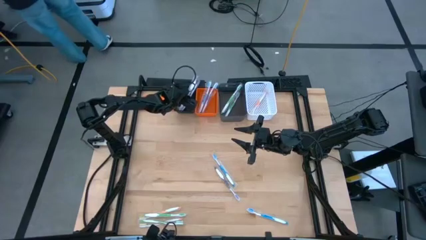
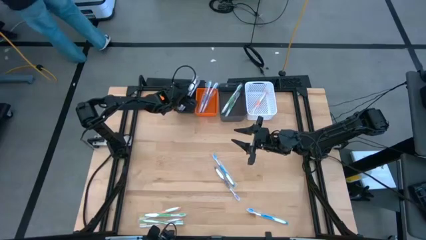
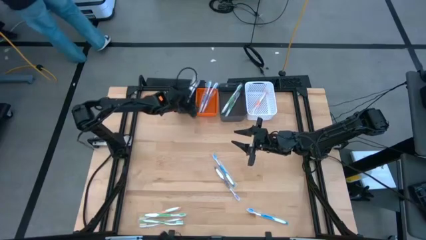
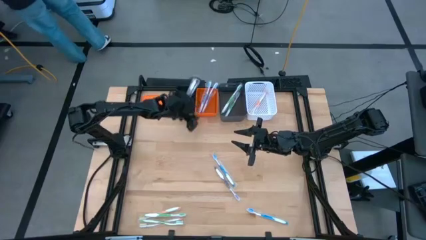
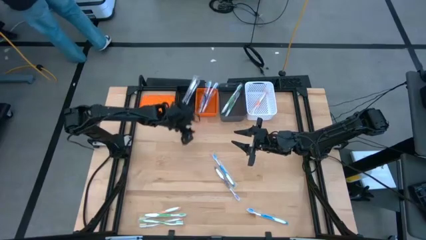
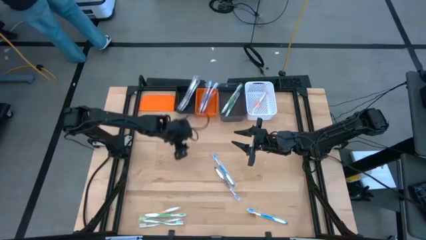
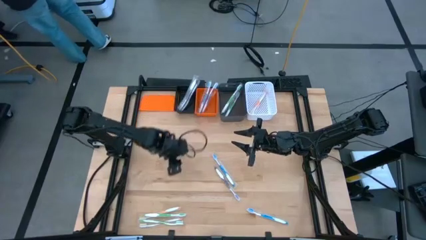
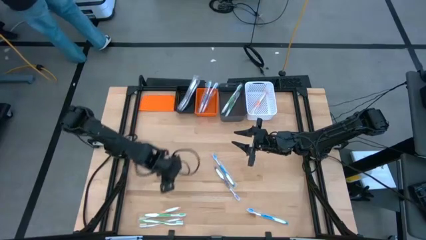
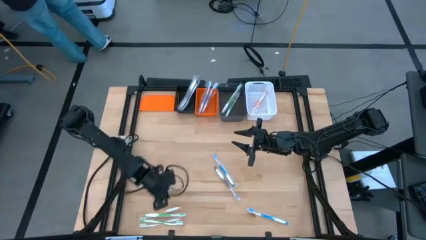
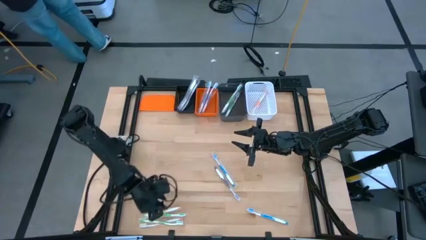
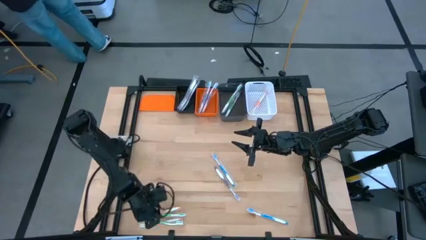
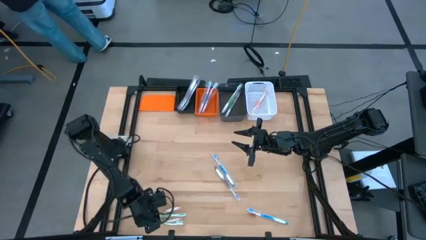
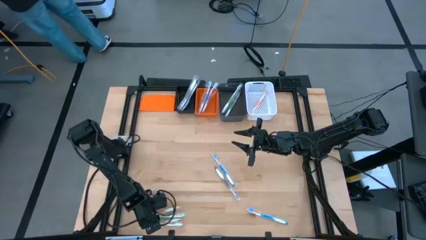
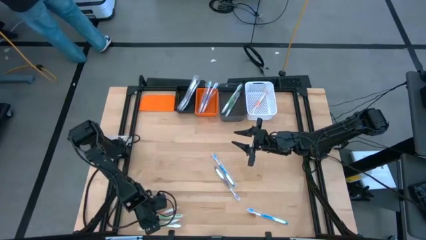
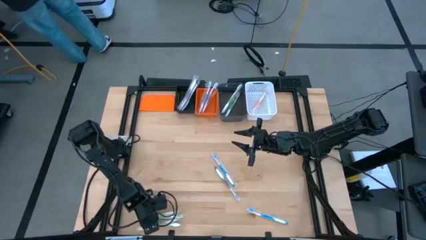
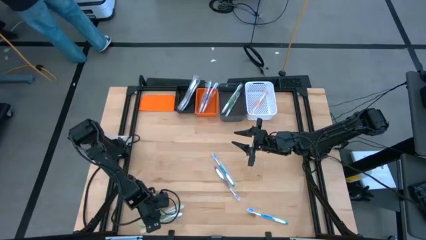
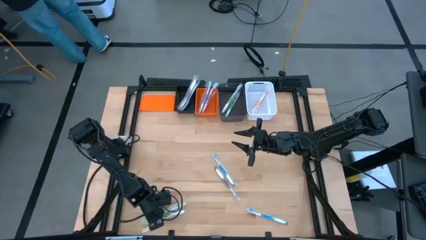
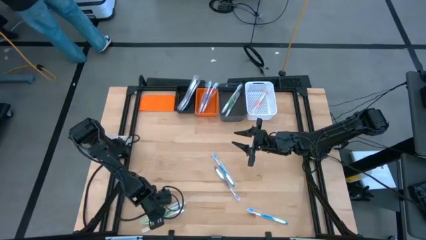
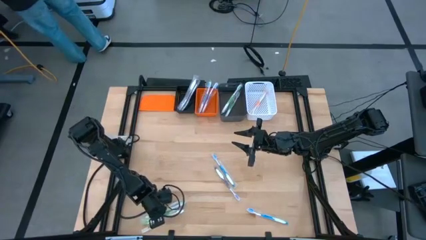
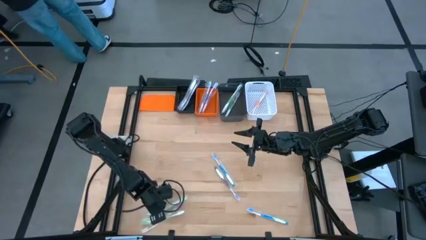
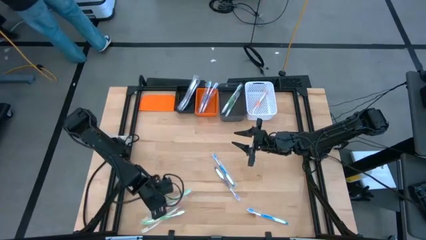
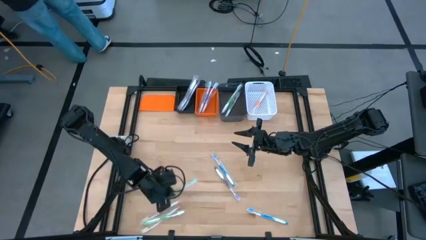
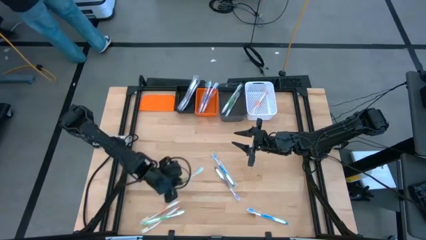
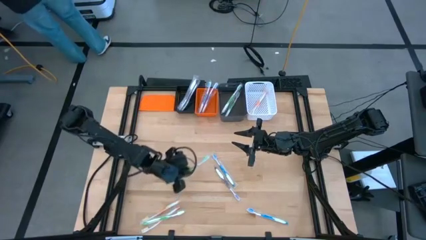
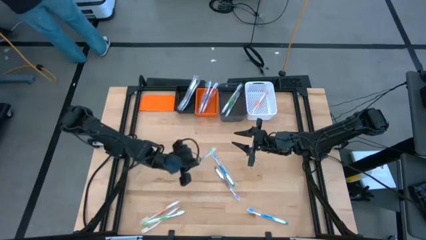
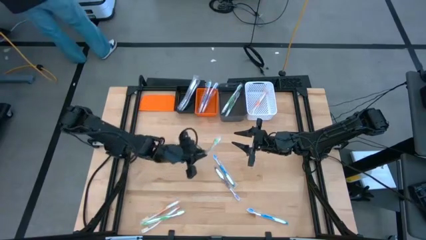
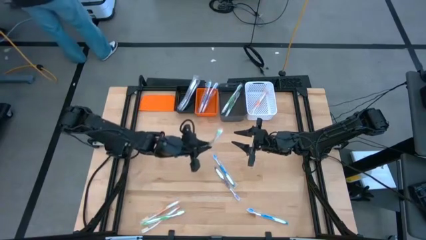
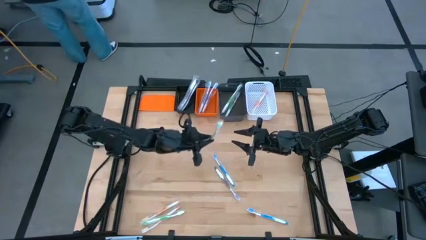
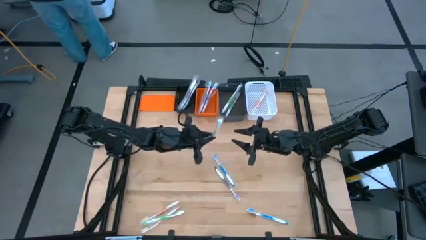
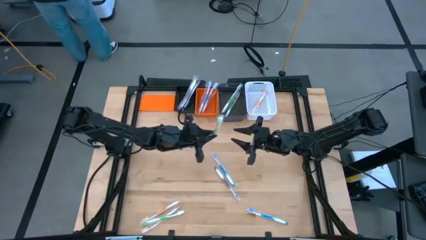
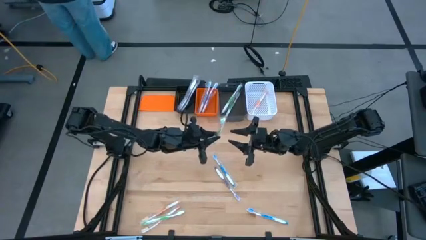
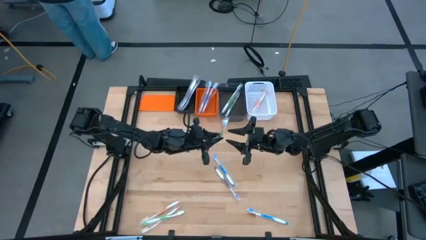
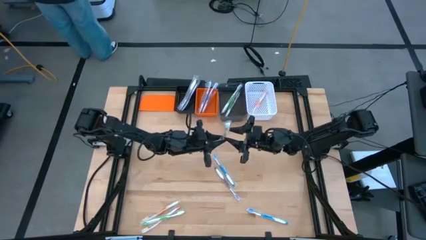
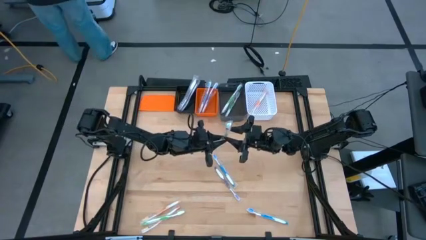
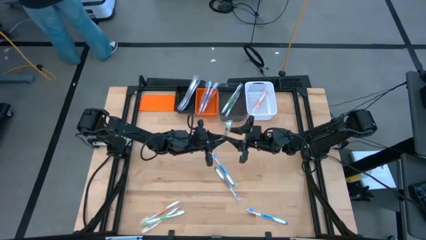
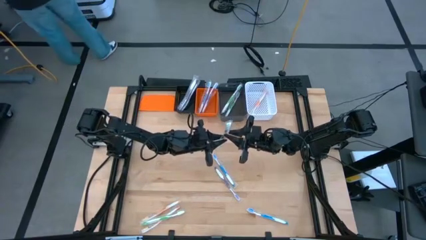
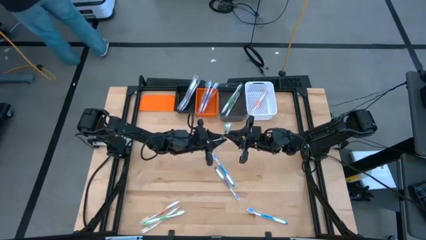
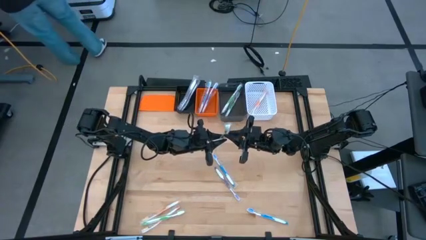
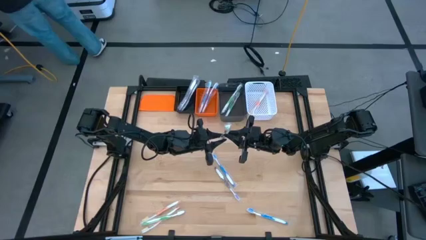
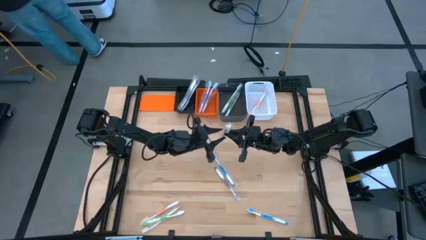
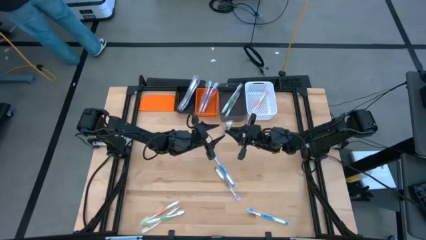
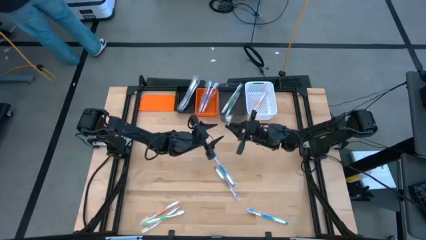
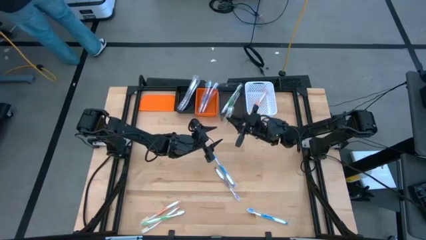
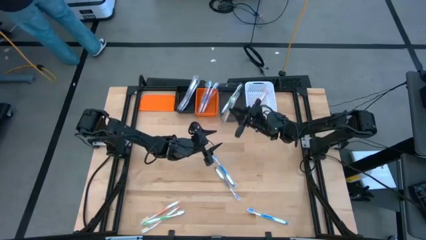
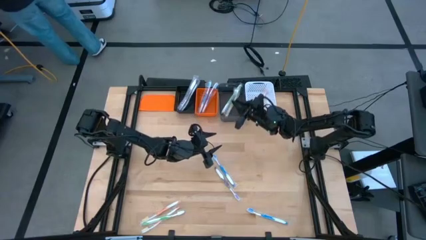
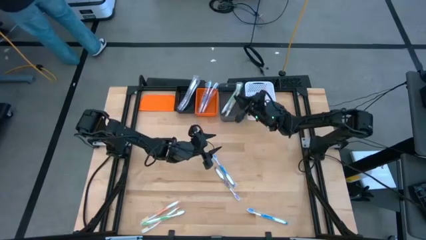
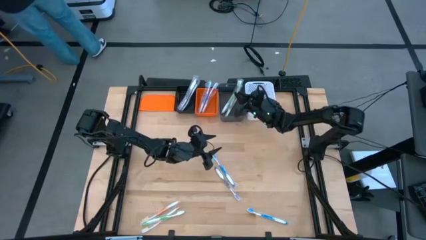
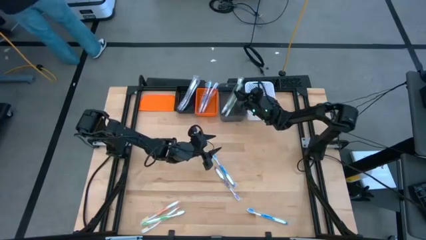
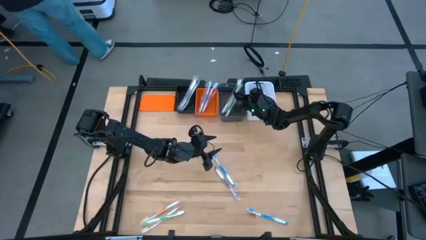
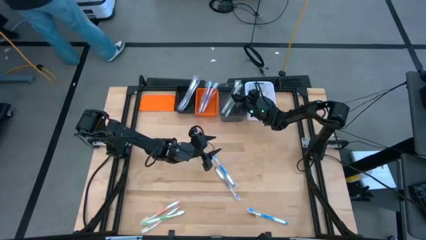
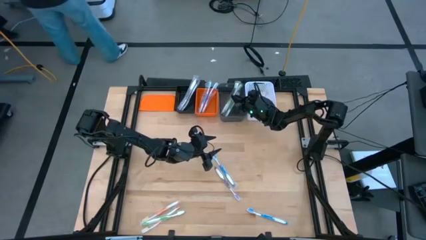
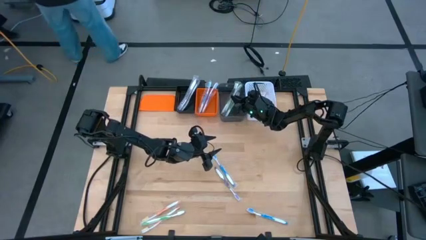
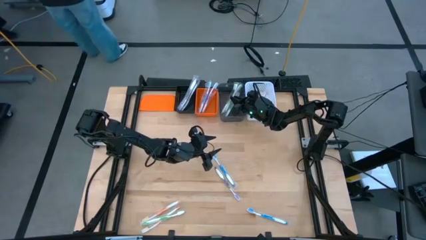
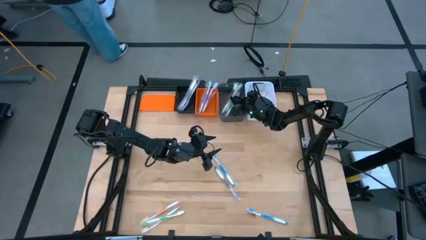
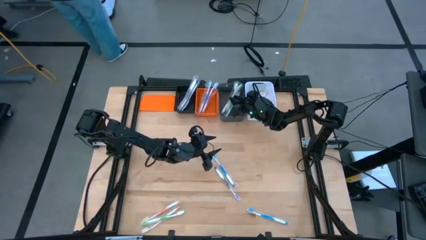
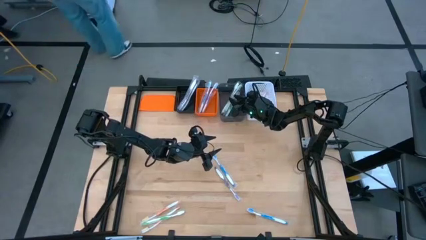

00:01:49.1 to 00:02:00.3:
Task: Pick & Place Toothbrushes
Put the green toothbrush into the gray bin

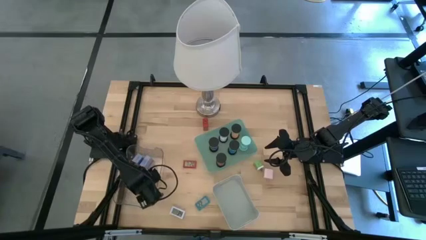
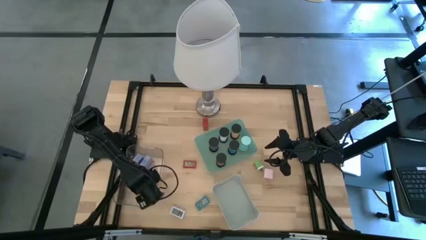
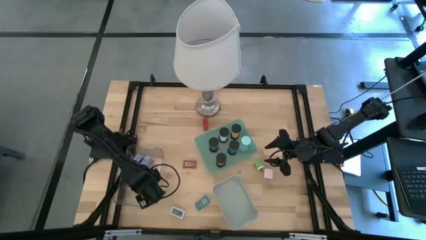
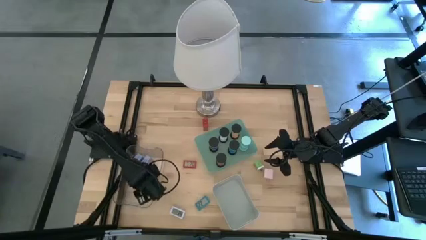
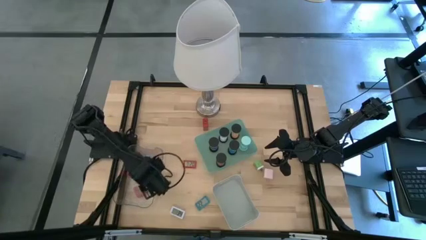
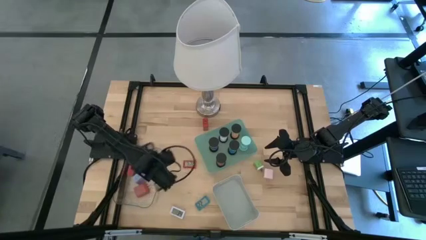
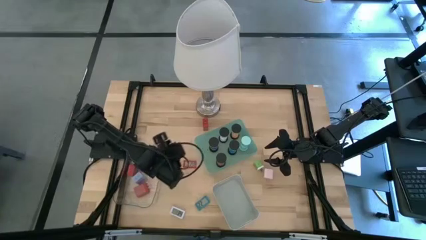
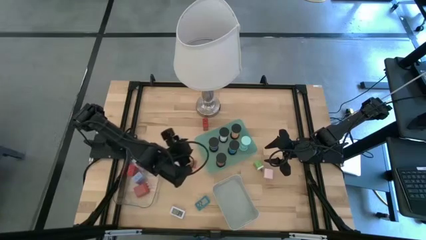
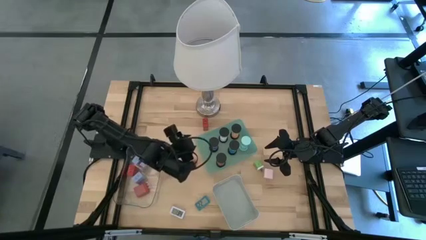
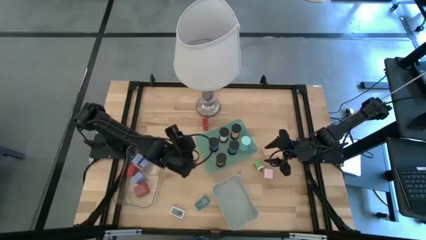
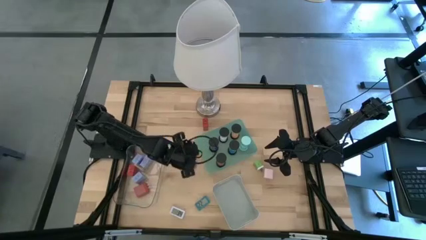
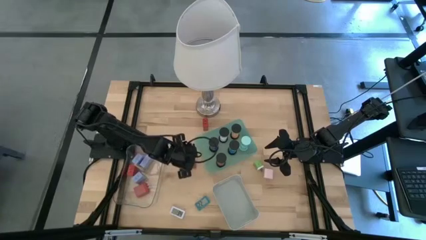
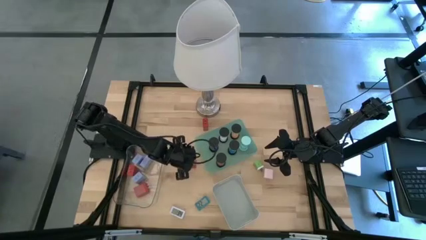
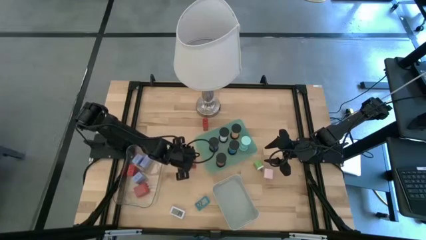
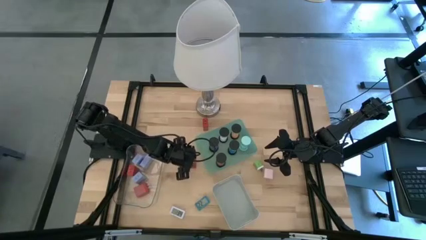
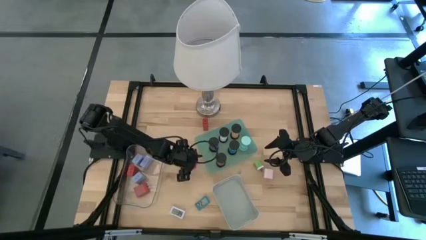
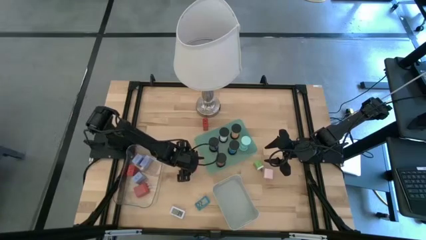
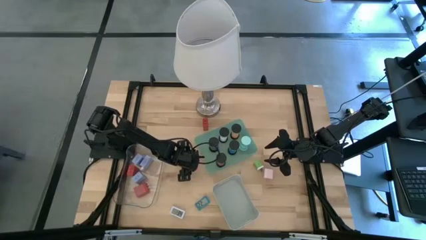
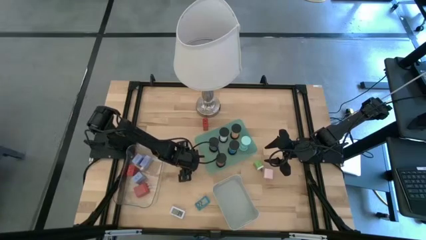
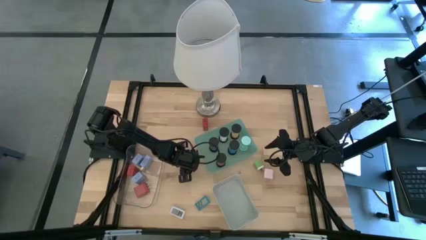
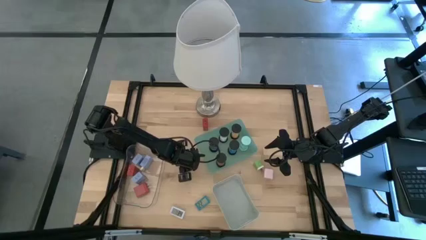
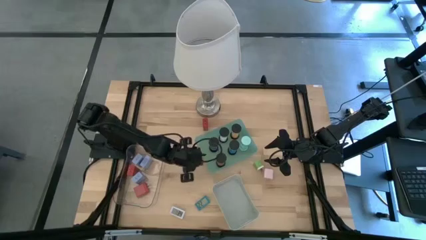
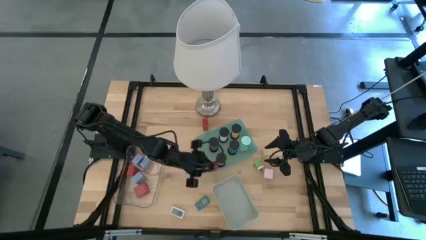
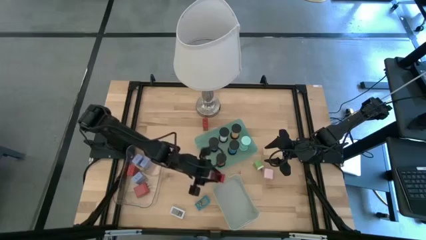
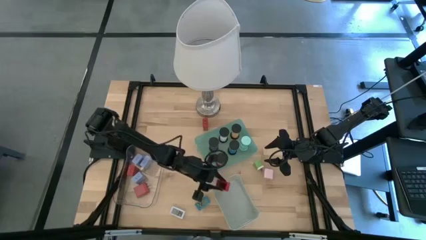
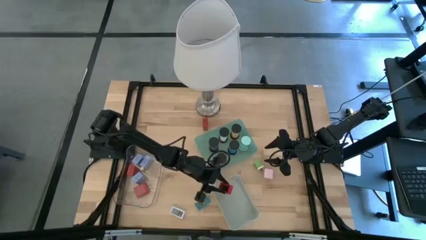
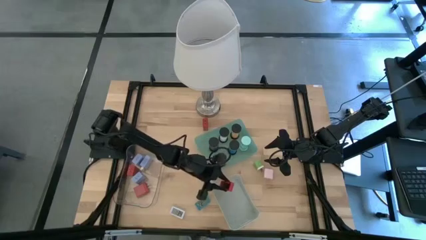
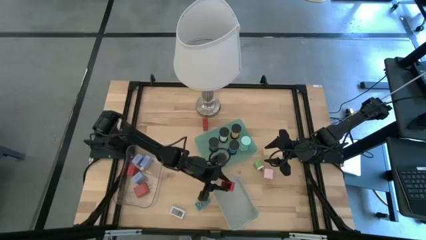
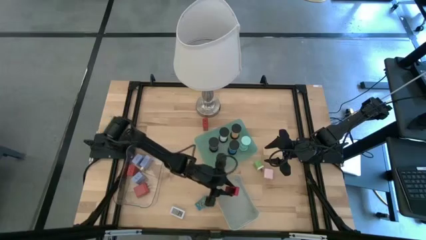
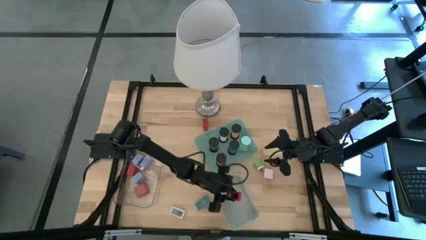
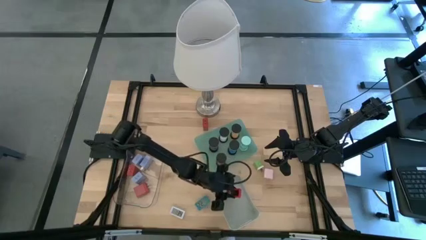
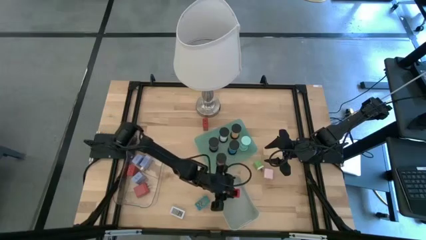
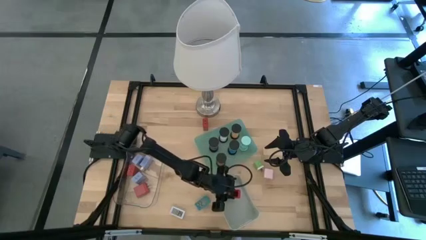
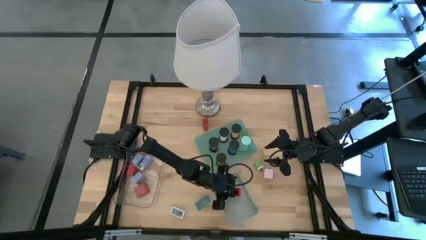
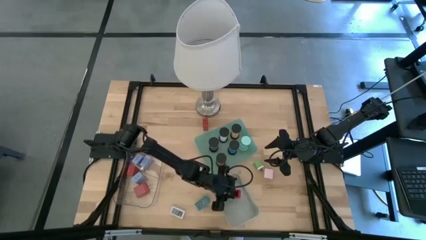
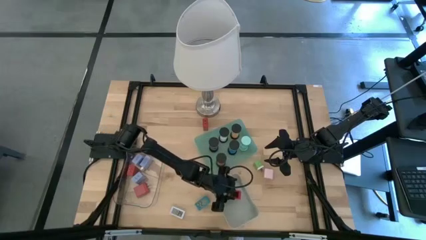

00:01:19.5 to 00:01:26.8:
Task: Pick & Place Office items
Put the red digital timer into the gray bin
